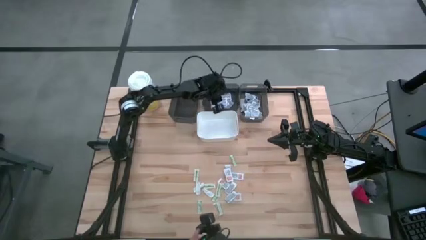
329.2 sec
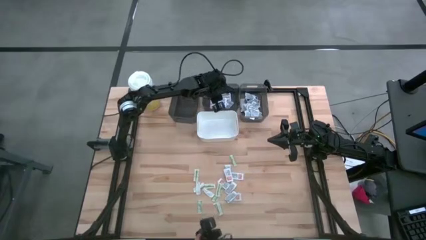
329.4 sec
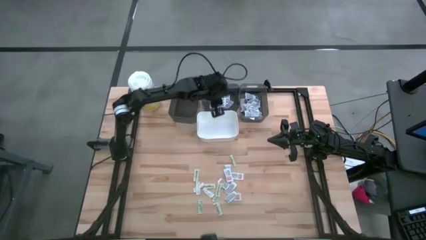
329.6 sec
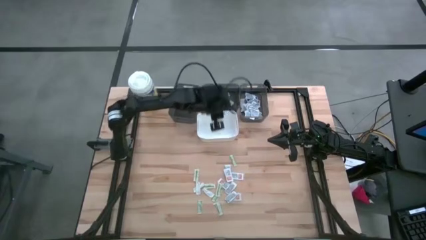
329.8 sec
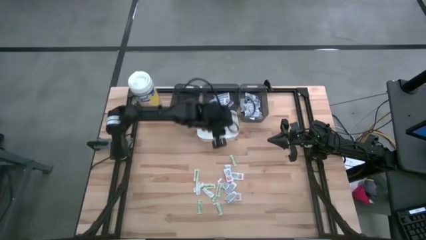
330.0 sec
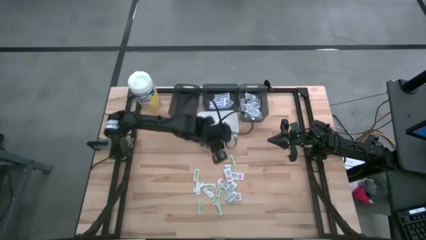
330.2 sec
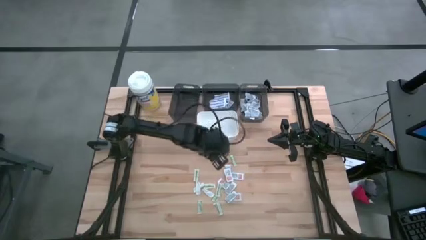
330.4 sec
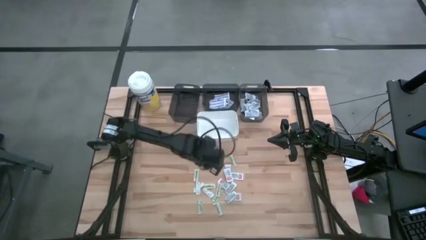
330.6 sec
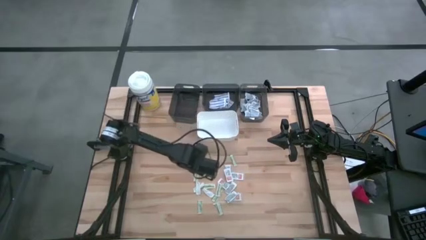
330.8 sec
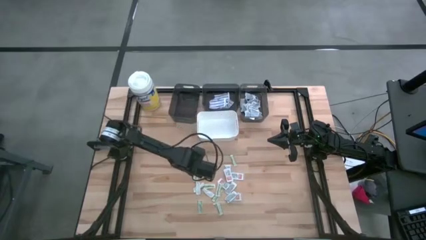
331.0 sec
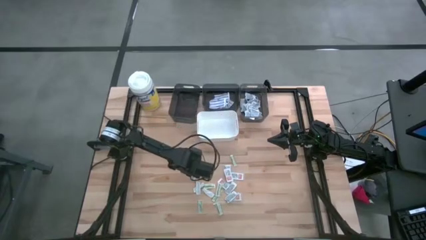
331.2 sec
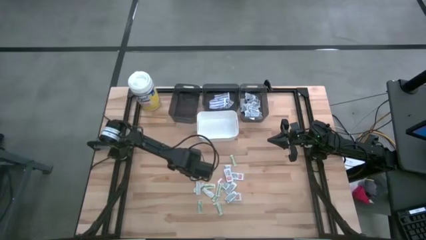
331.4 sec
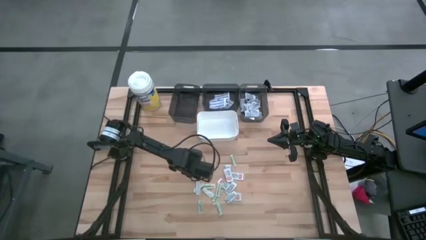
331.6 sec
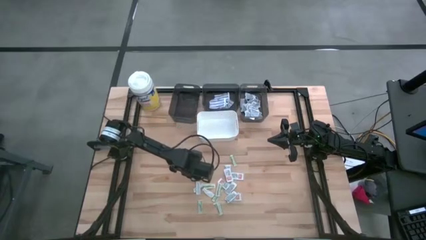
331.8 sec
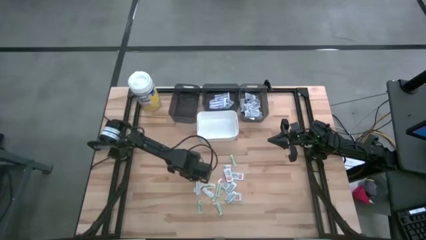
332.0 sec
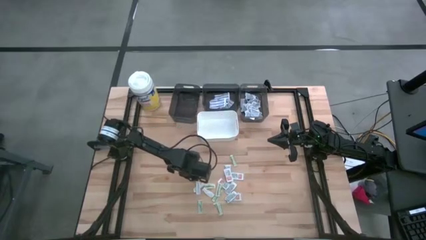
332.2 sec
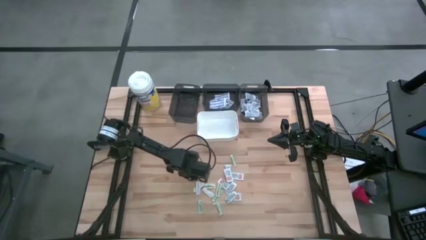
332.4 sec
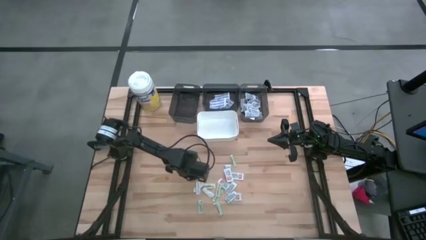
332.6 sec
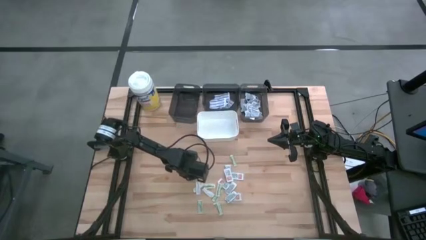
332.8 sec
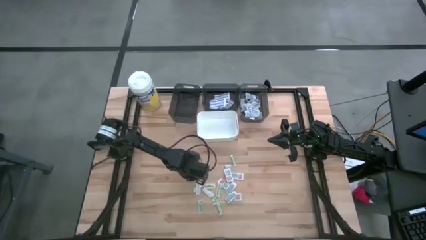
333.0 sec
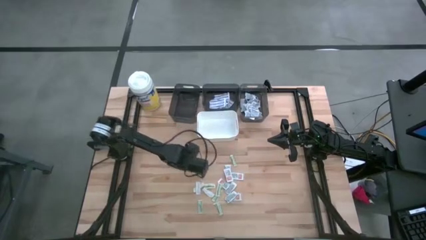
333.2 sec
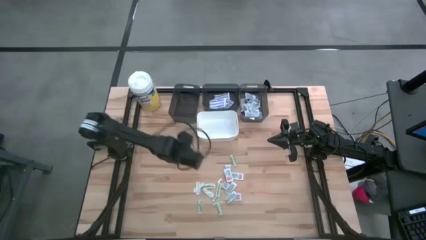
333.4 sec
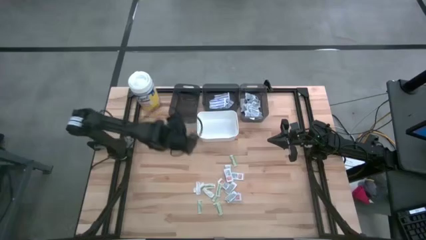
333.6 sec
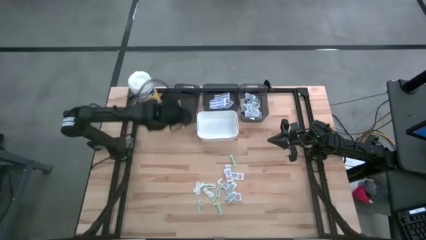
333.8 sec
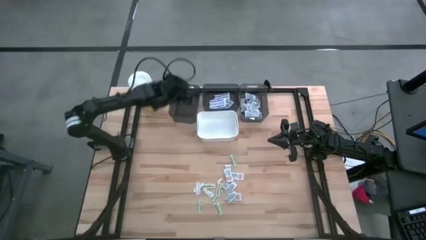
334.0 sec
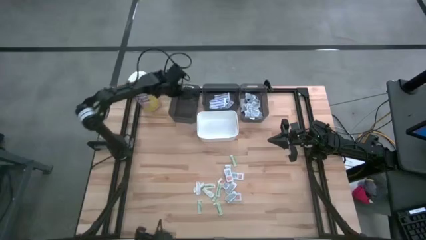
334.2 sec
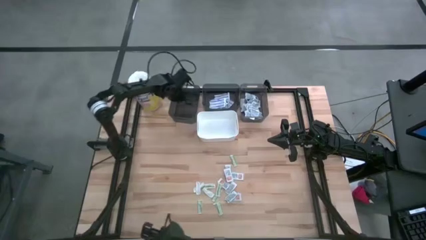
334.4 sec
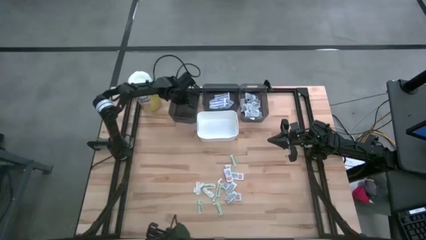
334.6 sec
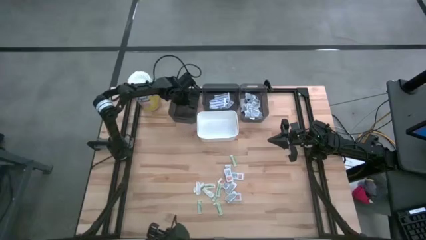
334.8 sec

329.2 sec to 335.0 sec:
Task: Pick & Place First Aid Supplies
Put the green bandage pack into the left black bin

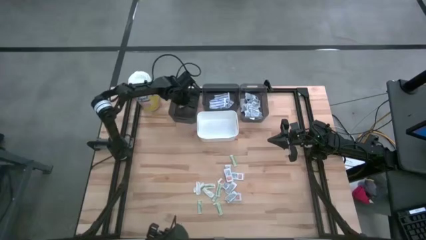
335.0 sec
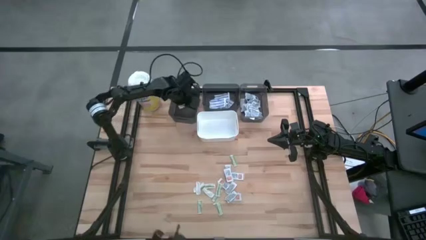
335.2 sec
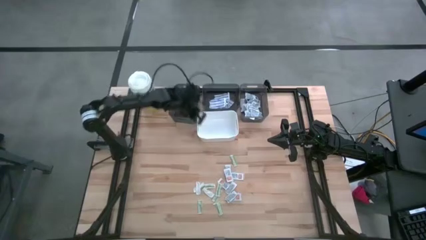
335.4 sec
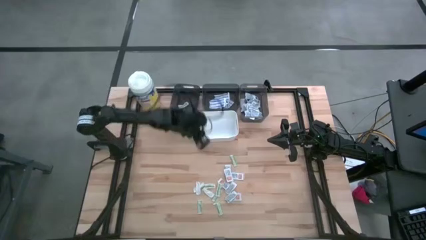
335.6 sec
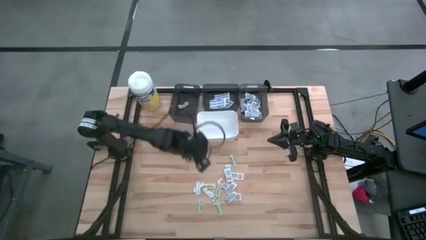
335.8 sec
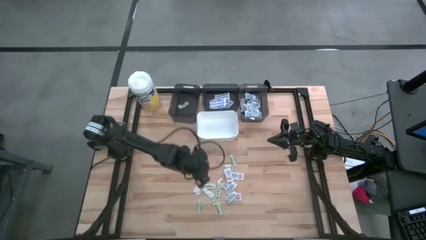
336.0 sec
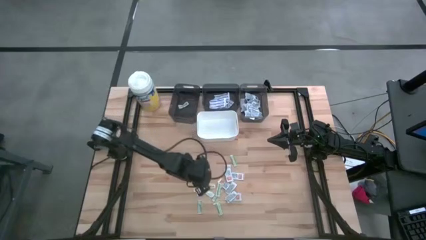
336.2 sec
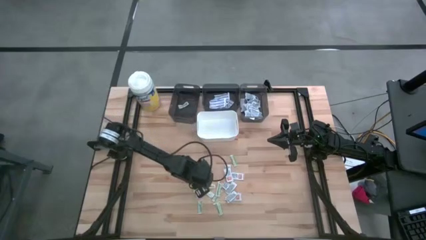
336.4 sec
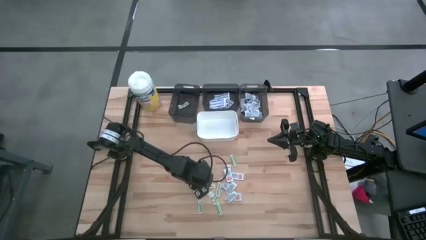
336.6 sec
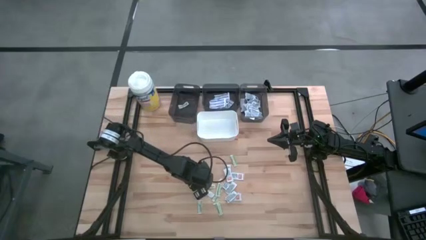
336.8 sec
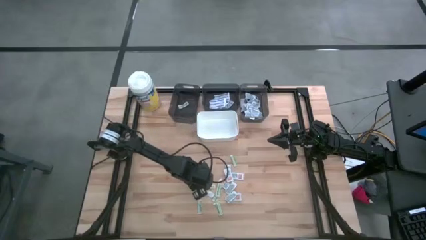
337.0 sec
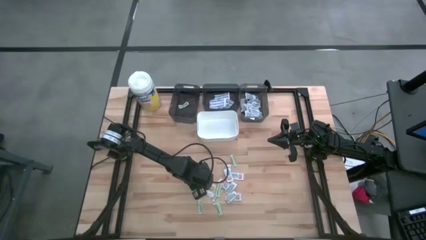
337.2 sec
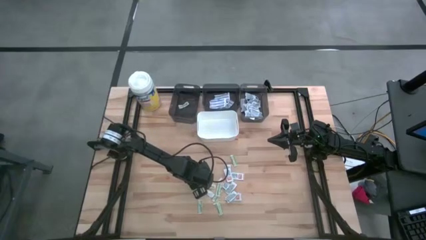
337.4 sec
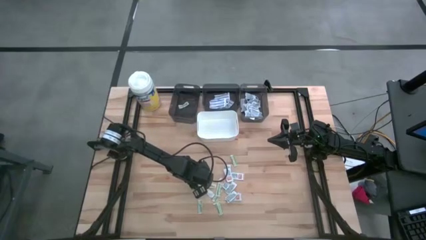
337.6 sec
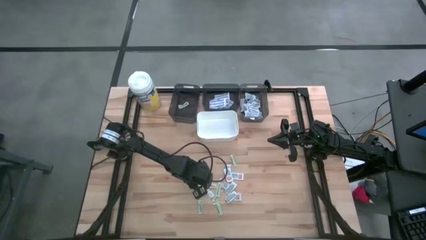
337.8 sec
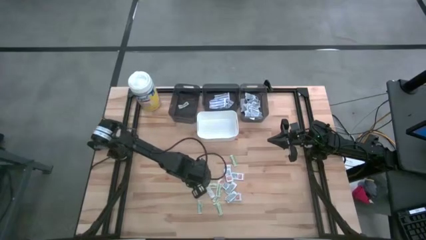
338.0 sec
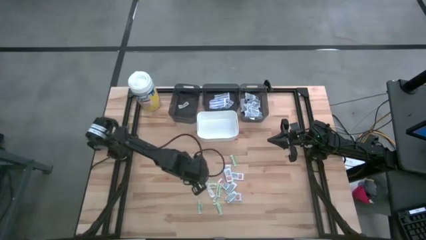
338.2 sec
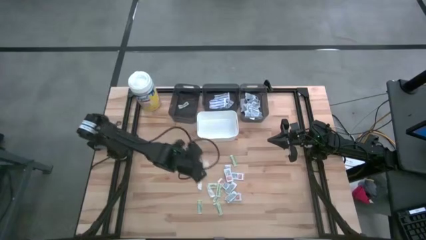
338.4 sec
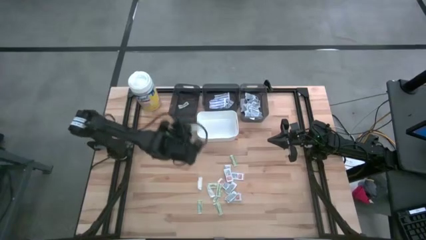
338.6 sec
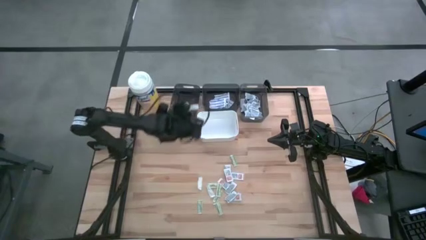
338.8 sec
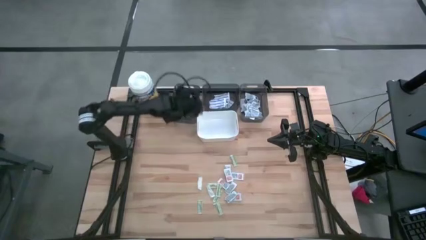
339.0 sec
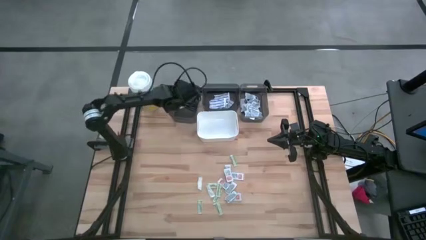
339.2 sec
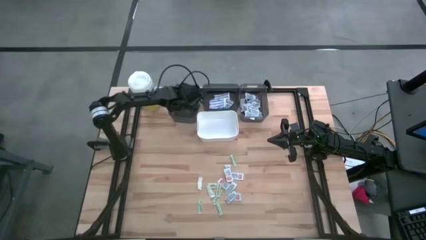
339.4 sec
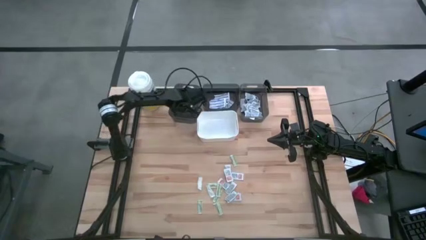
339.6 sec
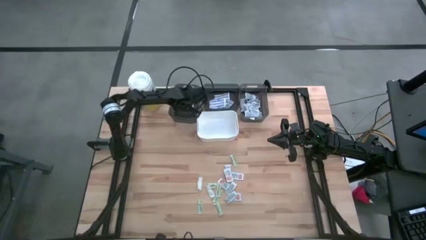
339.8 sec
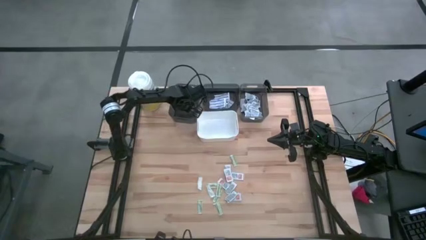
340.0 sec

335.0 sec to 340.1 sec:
Put the green bandage pack into the left black bin

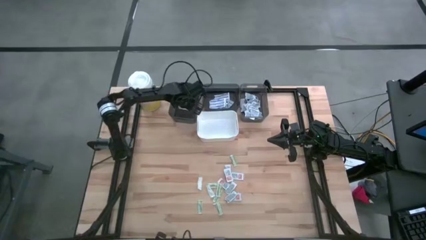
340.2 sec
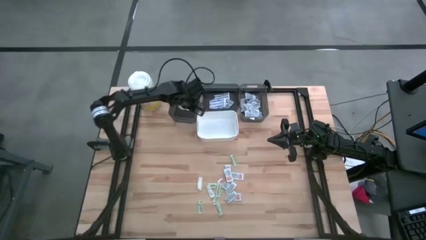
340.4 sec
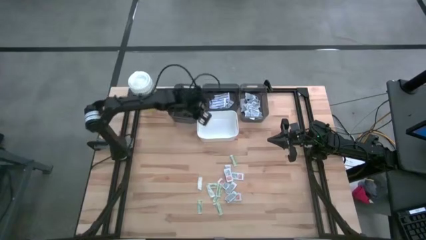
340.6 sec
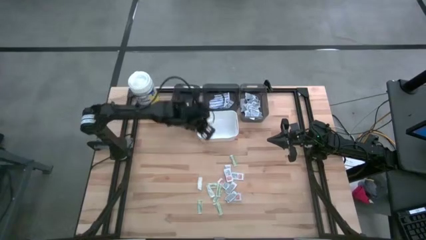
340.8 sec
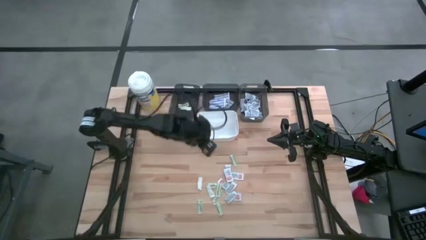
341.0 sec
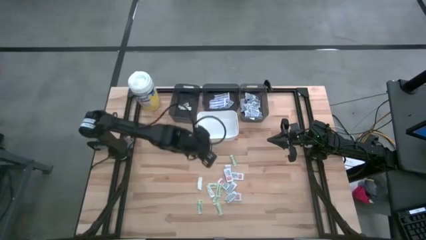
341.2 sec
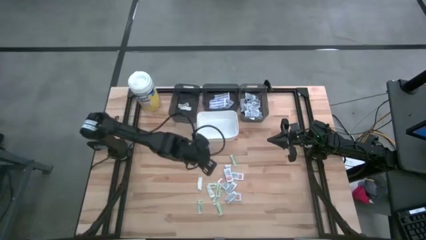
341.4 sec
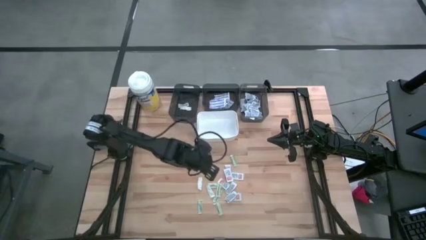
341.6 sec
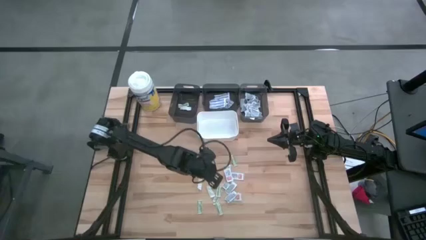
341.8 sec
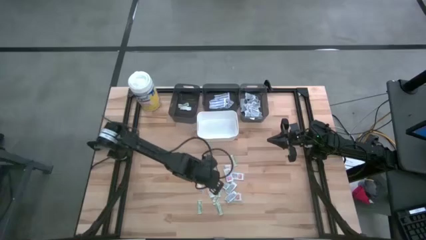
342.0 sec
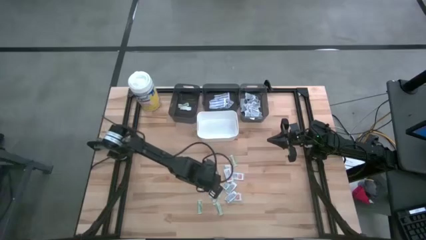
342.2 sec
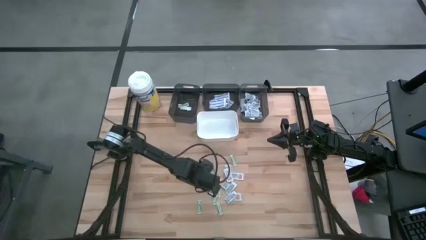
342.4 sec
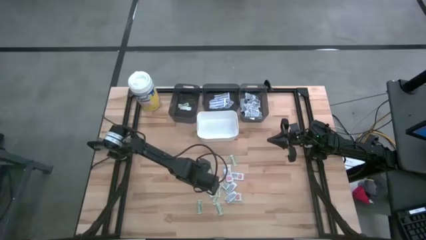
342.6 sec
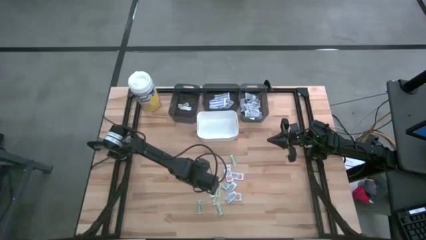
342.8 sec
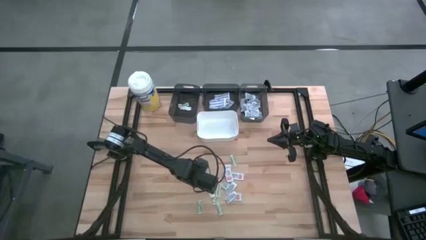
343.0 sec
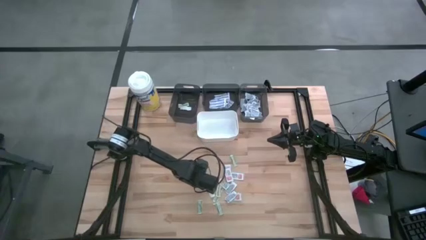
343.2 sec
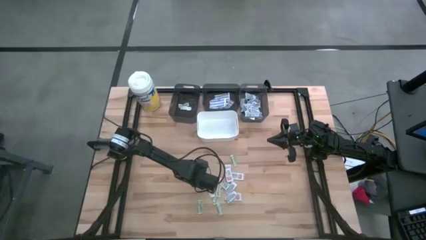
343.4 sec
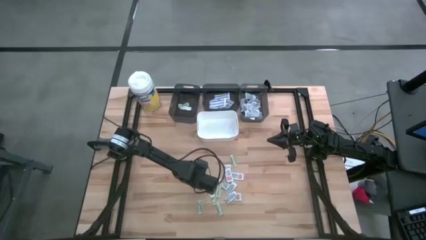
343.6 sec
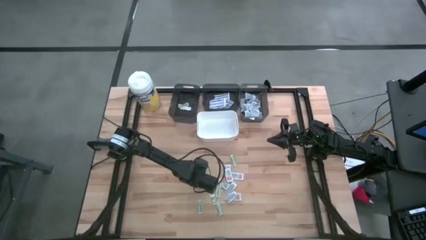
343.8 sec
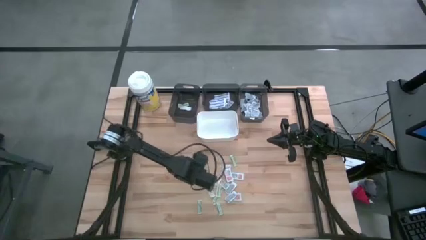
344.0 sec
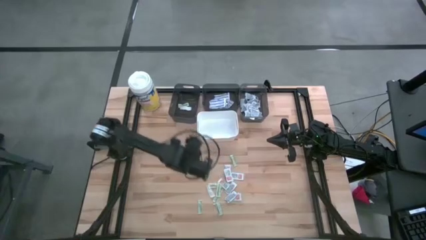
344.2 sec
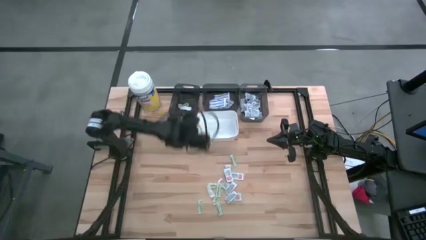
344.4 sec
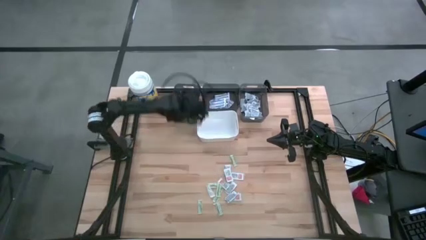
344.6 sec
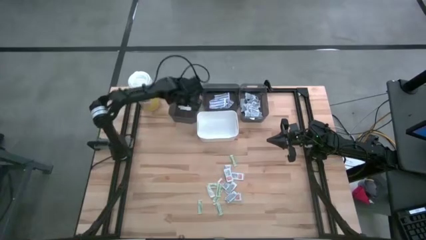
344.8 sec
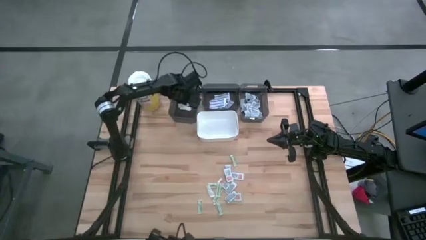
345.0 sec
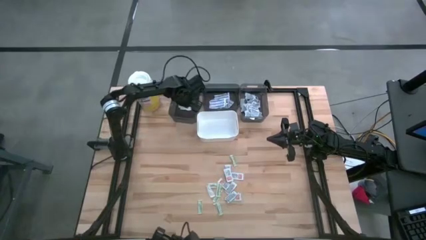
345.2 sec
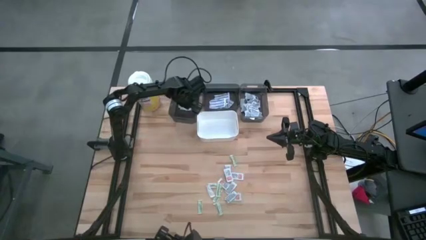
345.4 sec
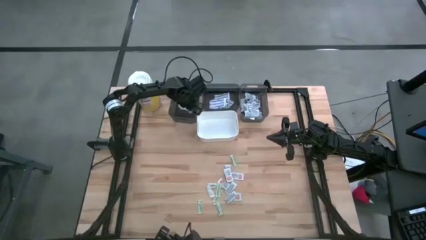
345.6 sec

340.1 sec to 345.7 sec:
Put the green bandage pack into the left black bin
